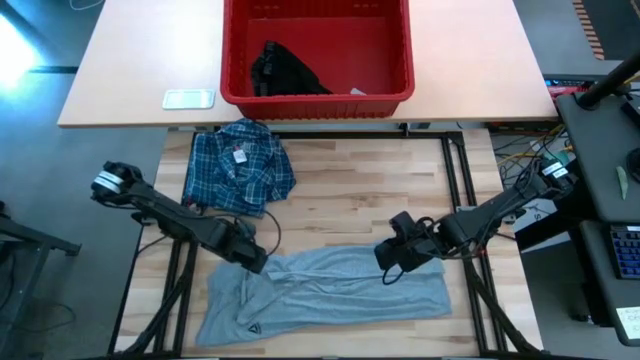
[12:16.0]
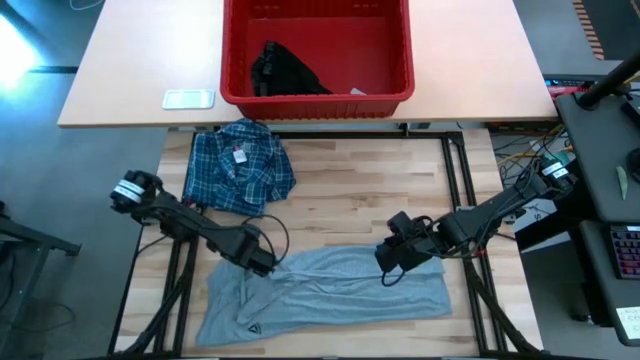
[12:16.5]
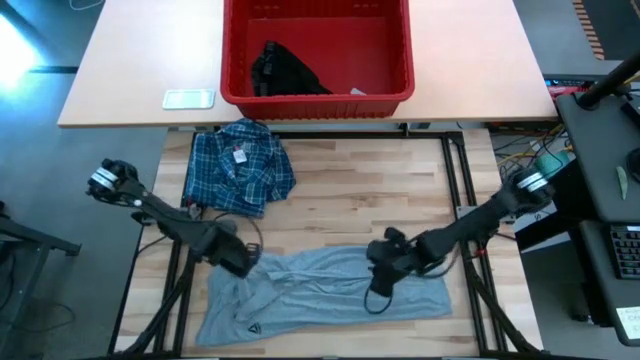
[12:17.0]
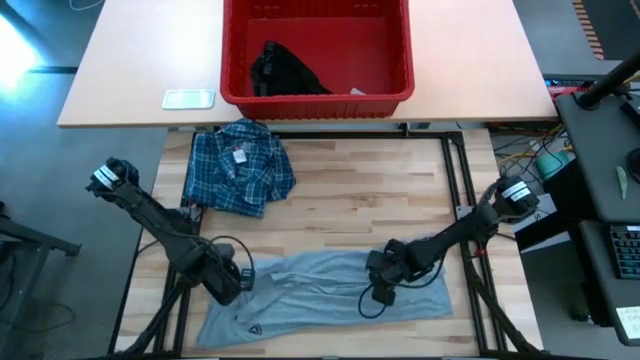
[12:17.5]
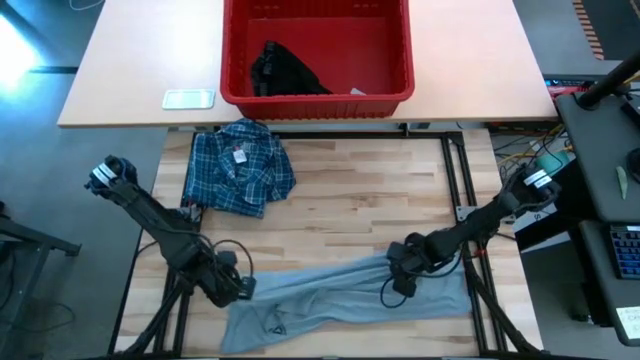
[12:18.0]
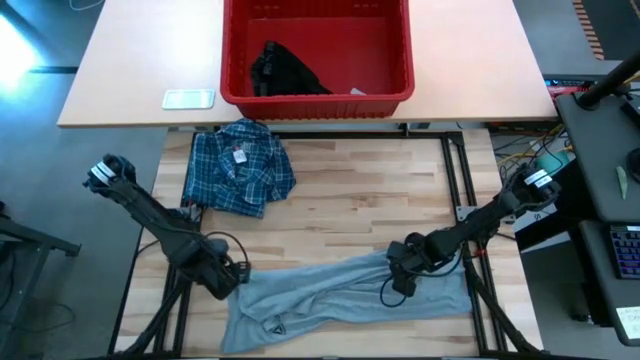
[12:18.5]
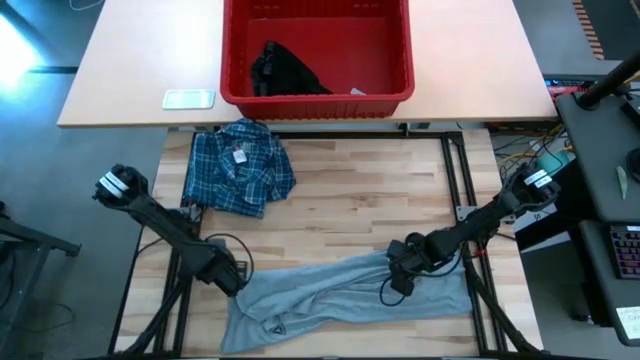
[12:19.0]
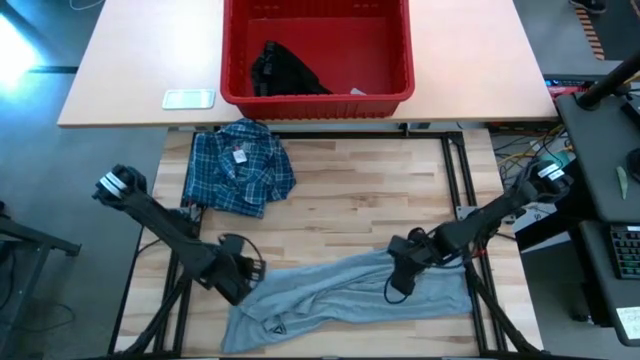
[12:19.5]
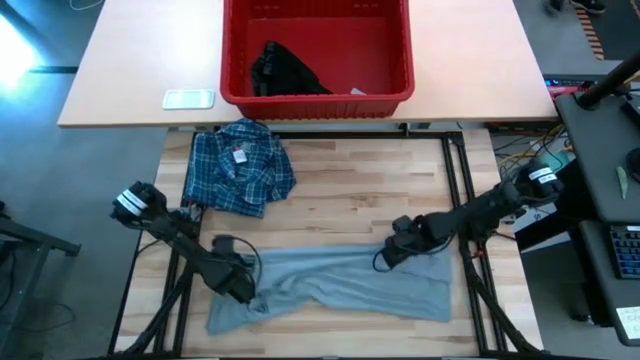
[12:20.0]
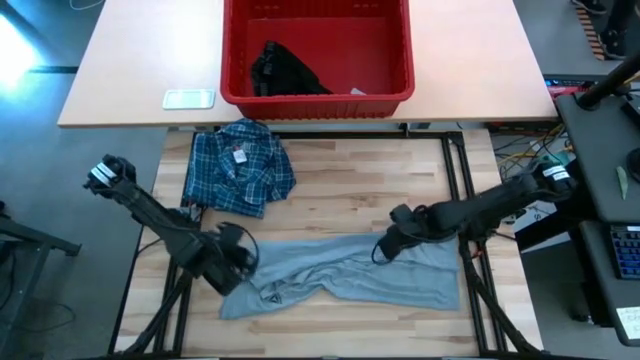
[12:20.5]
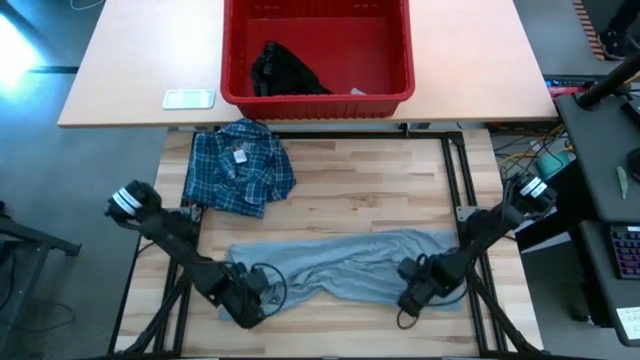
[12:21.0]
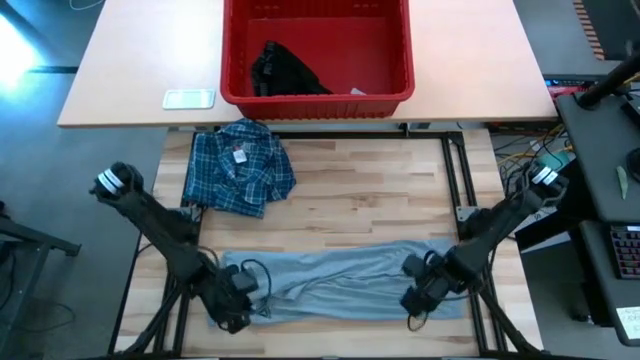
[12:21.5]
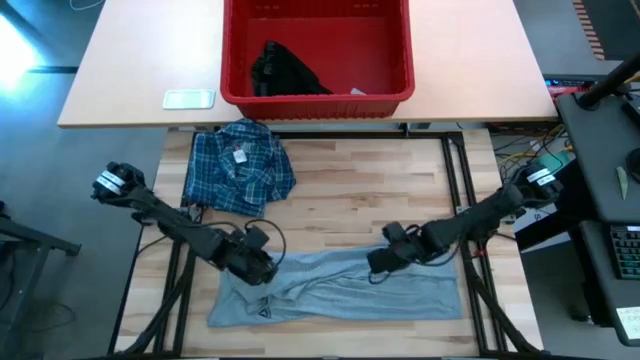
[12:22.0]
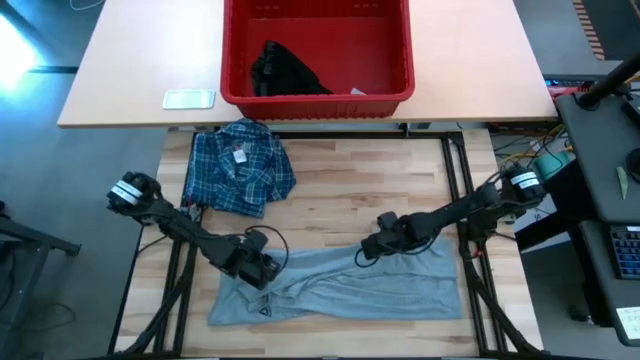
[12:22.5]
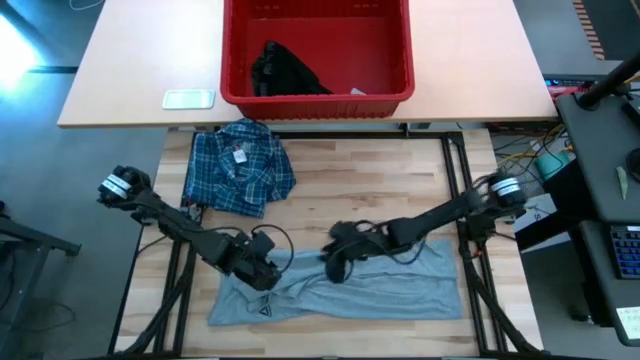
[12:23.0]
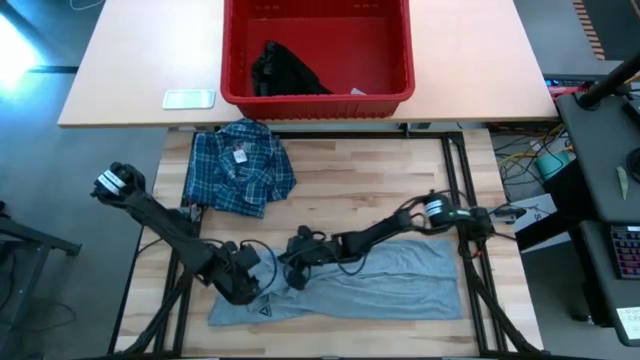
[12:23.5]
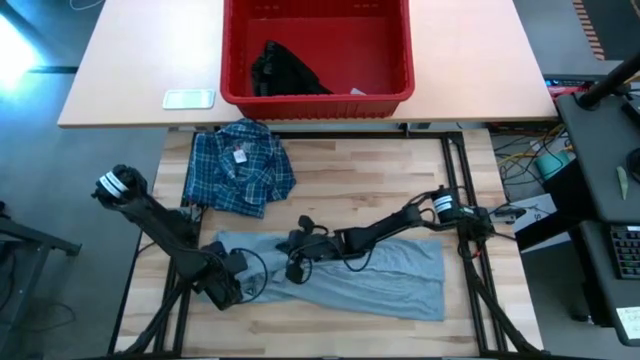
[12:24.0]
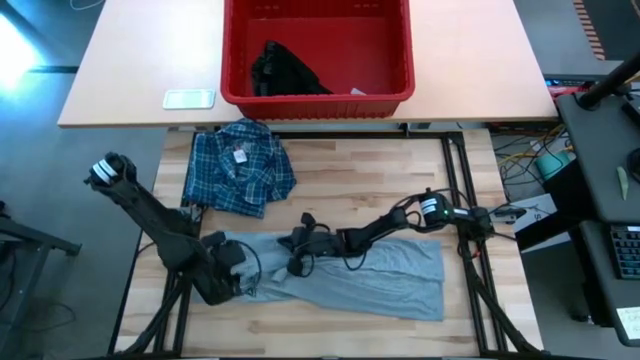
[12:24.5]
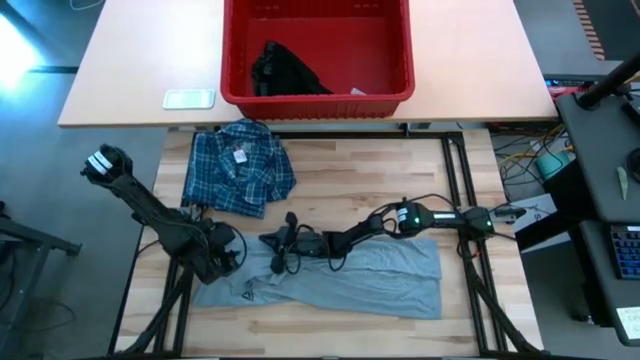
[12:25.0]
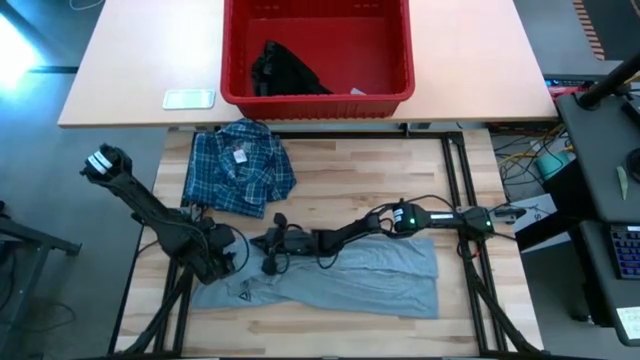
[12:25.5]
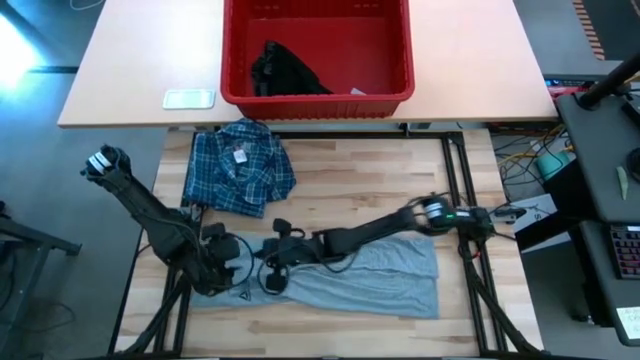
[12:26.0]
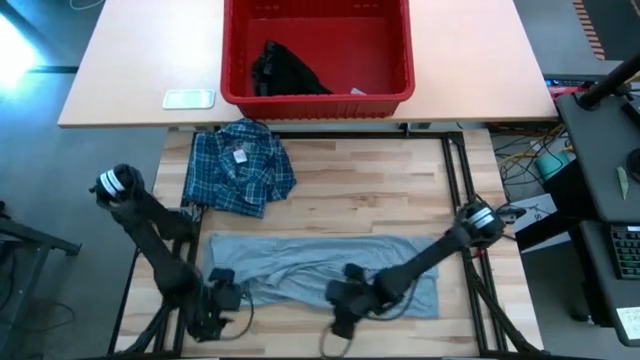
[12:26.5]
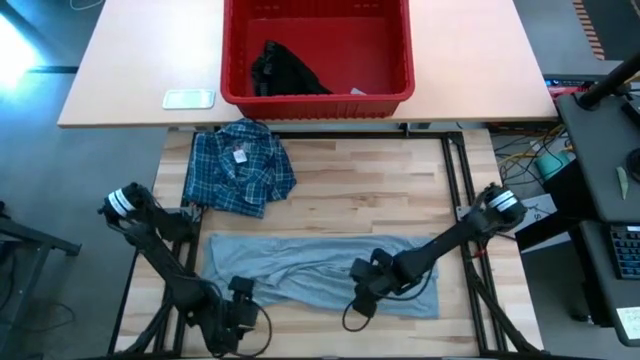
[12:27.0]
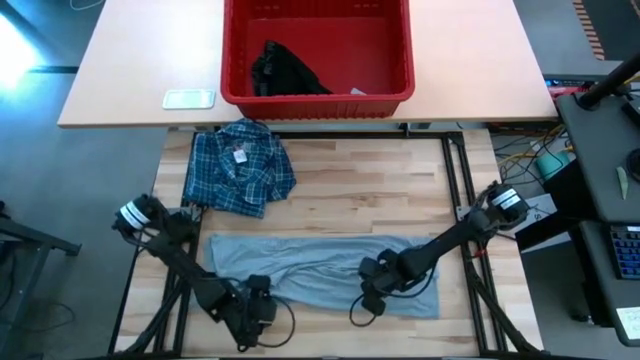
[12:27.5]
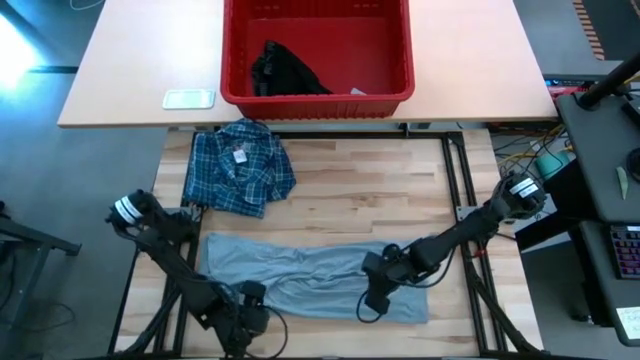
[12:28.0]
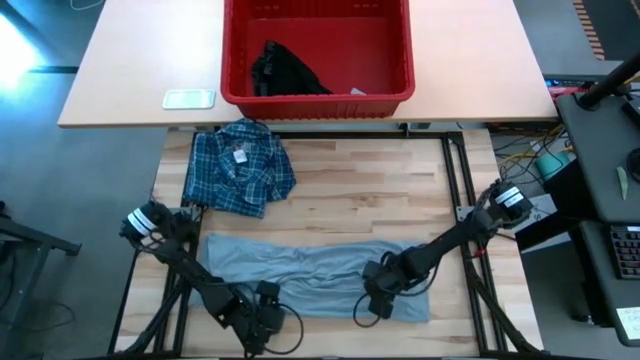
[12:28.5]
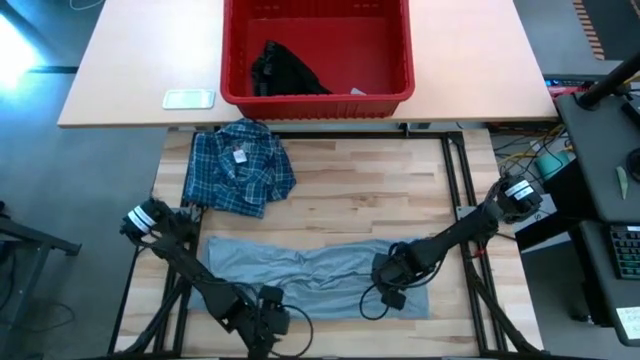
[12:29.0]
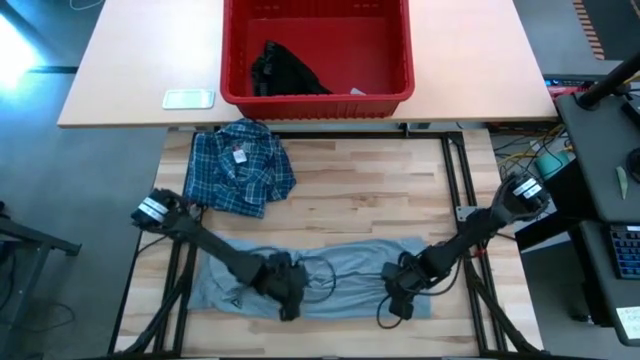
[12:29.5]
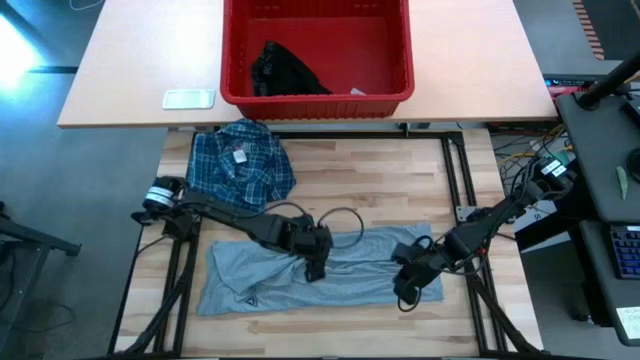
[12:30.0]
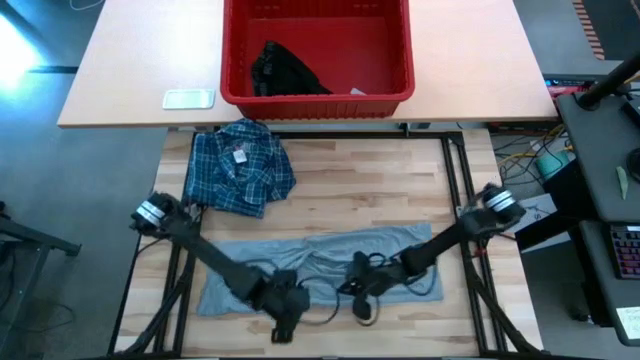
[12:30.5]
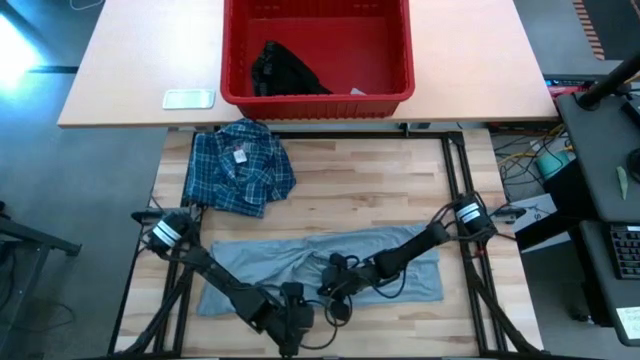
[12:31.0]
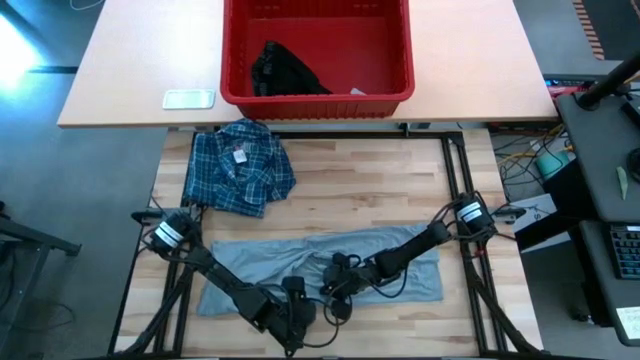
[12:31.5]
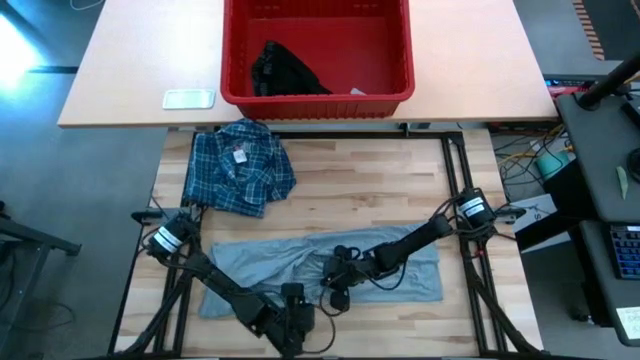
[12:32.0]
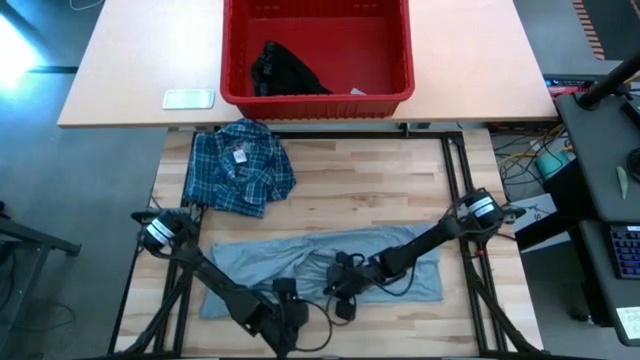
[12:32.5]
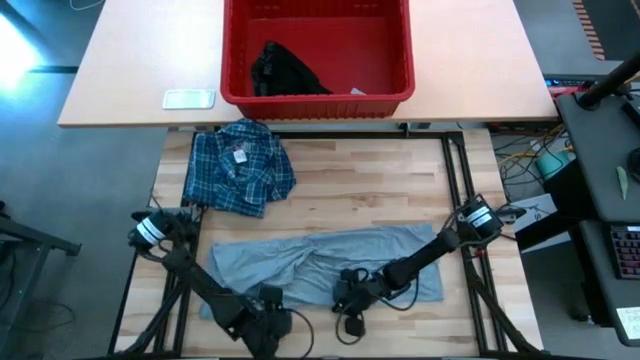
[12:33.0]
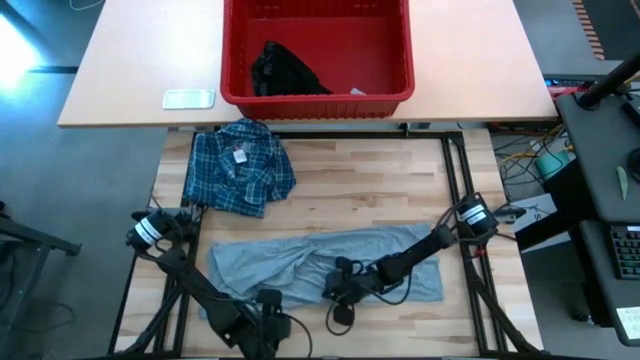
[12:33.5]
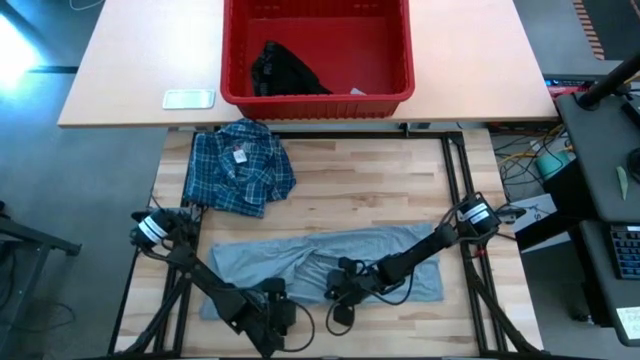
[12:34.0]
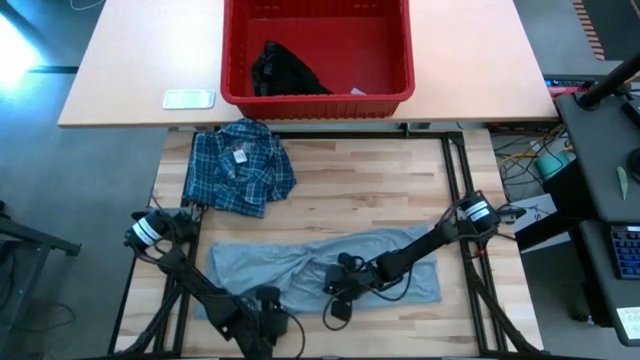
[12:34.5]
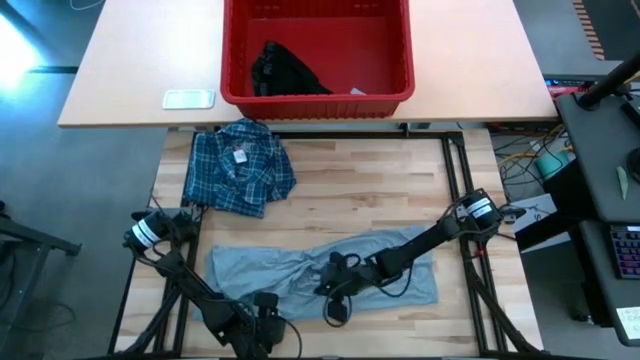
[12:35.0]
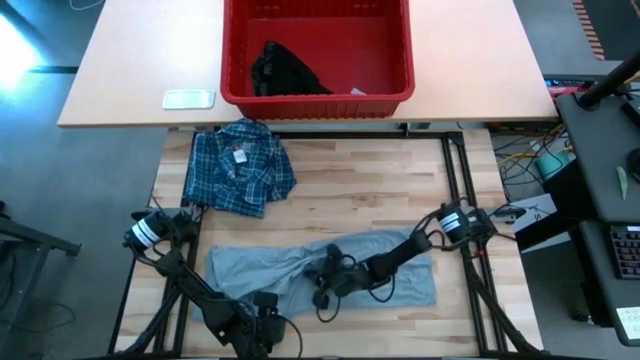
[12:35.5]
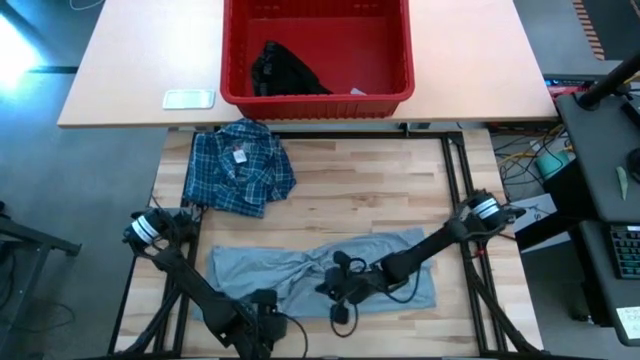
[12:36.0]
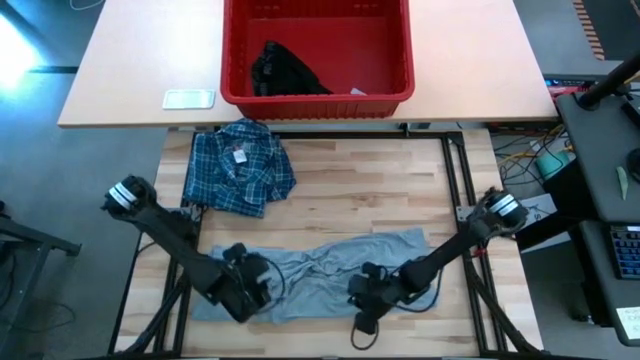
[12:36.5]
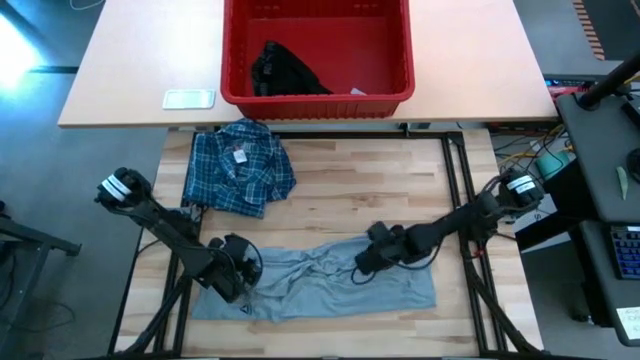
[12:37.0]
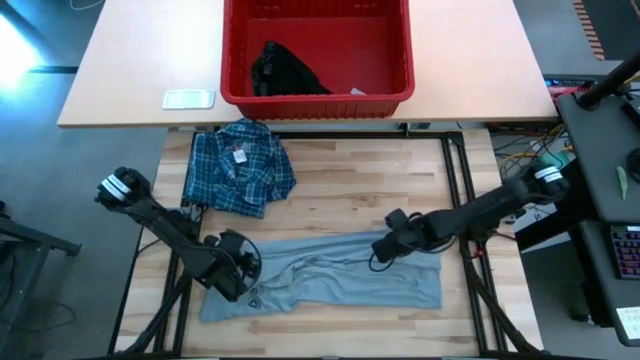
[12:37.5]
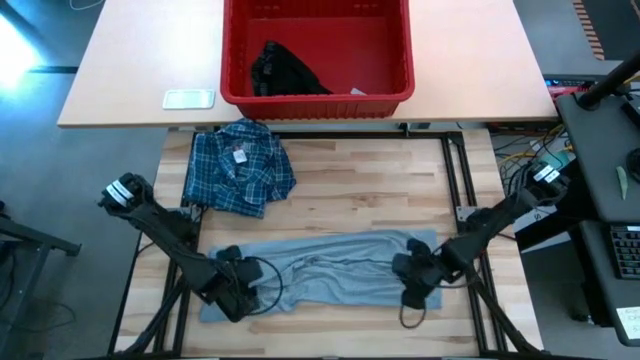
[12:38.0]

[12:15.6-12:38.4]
Task: Fold Laundry from Bin
Fold the gray shirt
